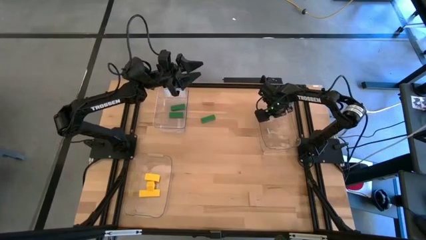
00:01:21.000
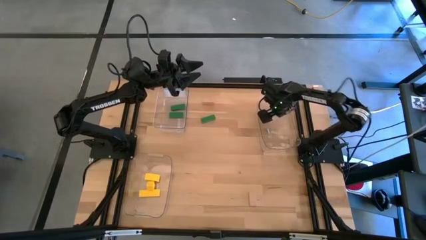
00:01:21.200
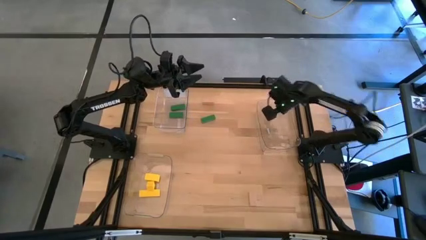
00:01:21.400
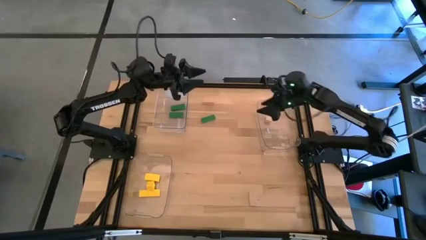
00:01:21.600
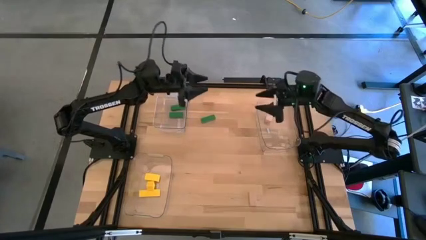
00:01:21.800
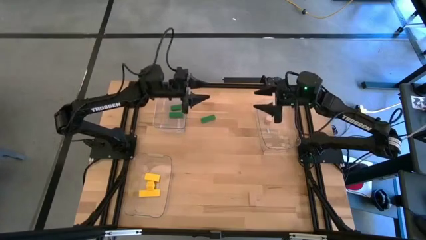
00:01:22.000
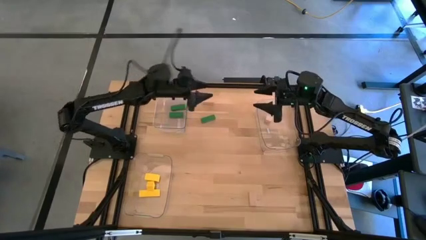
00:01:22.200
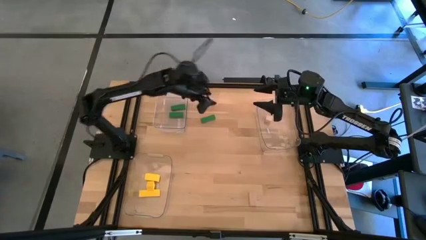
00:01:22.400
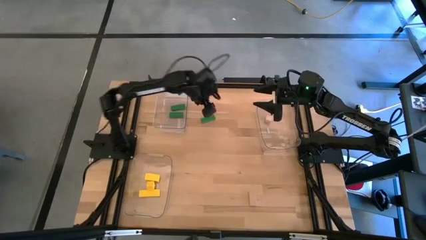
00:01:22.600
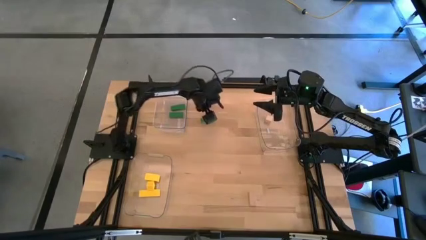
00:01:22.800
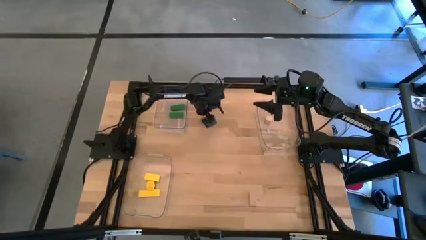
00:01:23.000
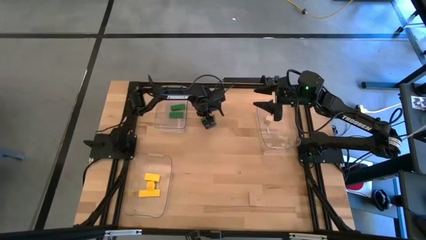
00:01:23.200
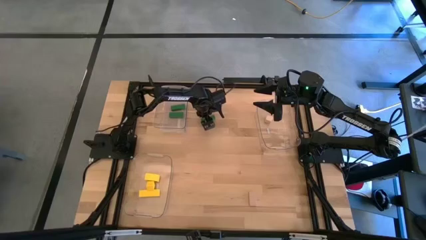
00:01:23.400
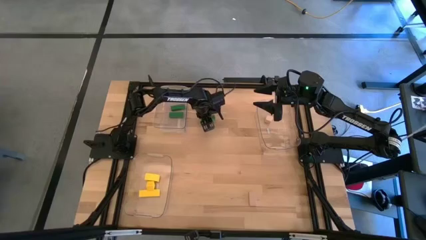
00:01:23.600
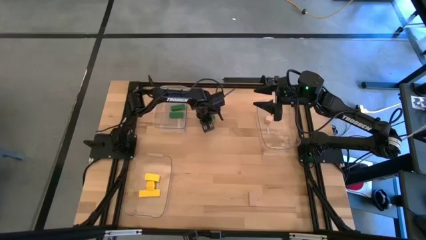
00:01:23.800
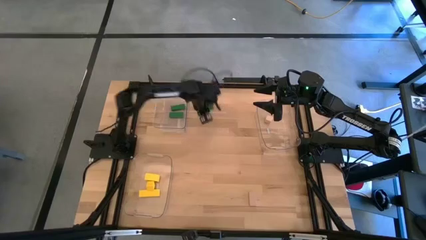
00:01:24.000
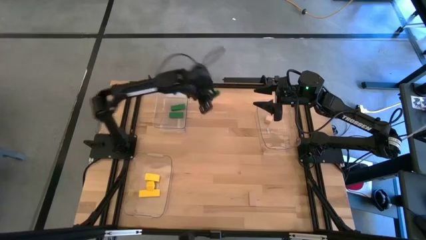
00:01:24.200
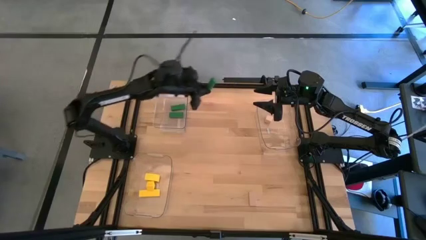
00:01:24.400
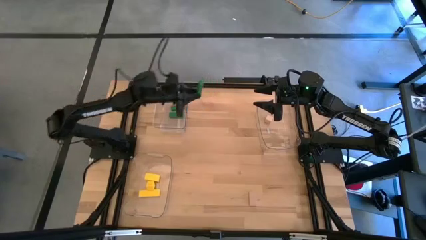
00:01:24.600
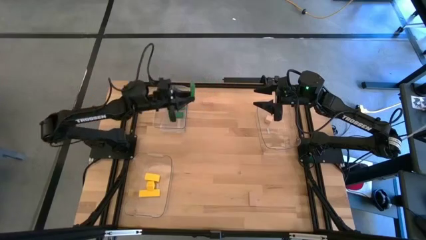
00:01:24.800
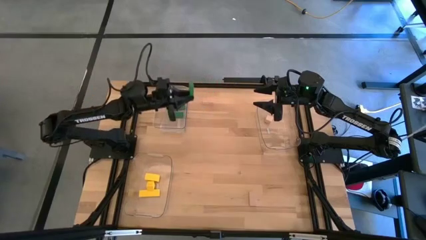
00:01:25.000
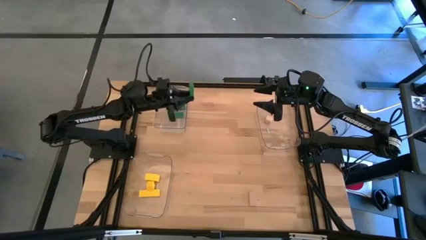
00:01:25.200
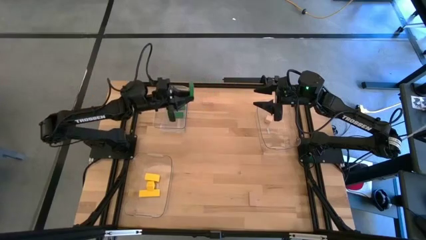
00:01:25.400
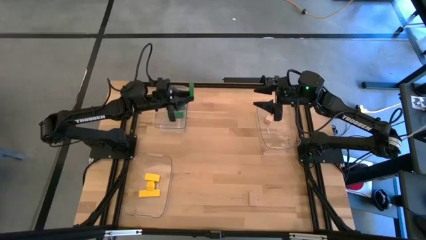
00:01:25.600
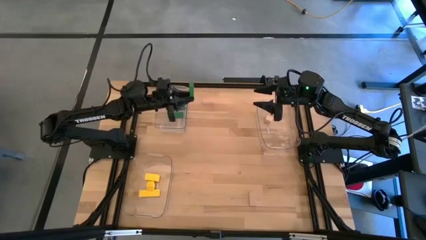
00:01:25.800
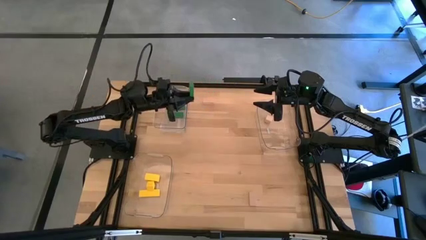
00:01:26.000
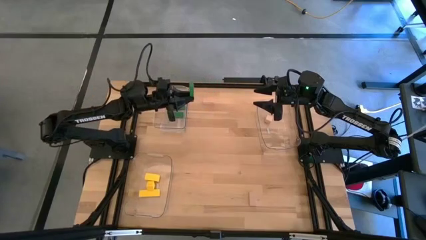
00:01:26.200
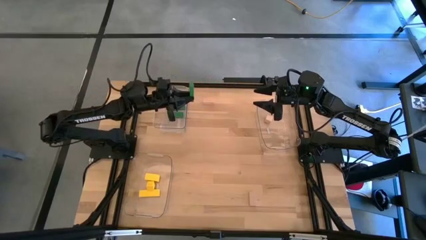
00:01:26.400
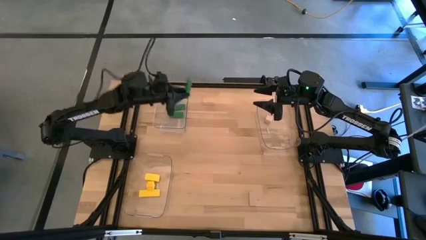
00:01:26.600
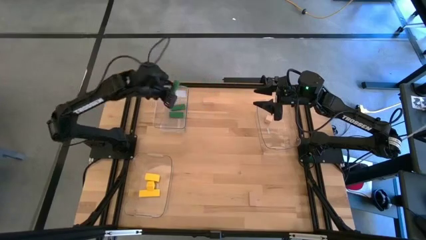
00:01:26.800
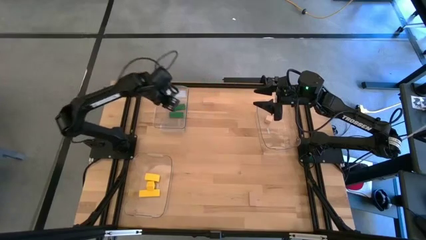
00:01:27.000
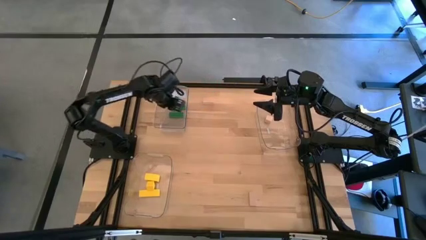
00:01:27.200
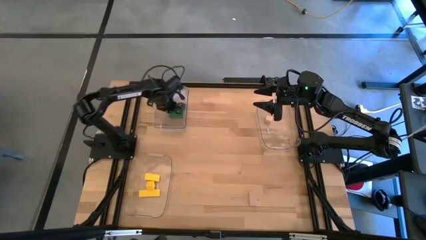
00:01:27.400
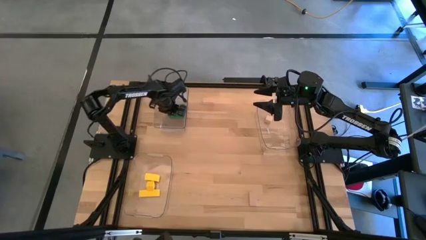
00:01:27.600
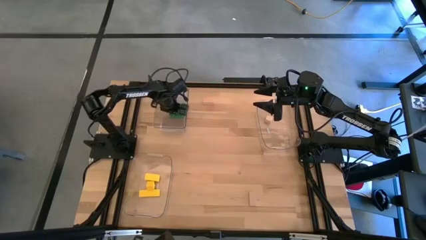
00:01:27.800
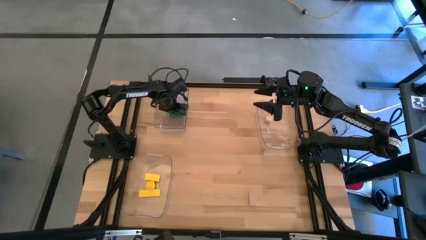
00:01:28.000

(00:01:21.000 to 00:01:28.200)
Task: Sort & place blocks by color
Put the green block into the top left transparent bin

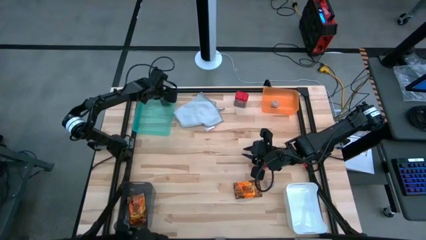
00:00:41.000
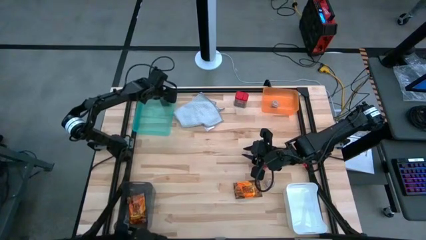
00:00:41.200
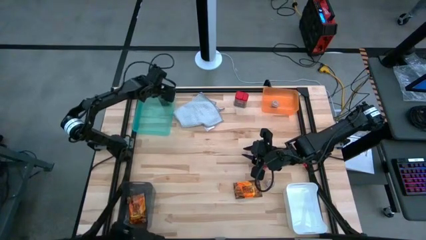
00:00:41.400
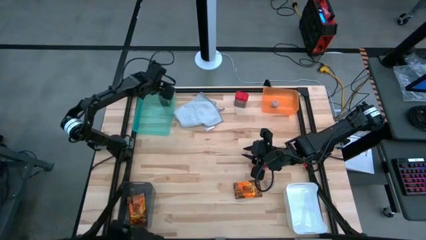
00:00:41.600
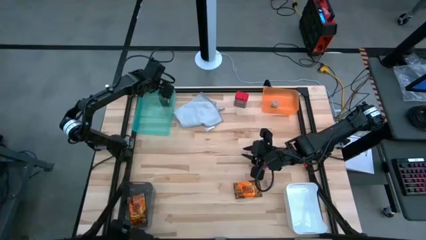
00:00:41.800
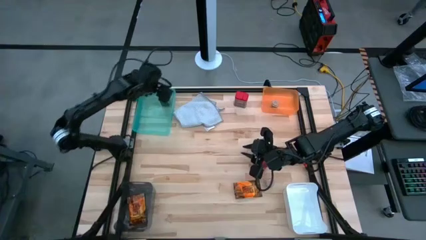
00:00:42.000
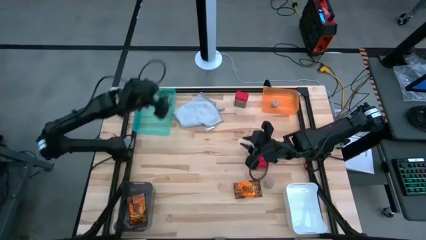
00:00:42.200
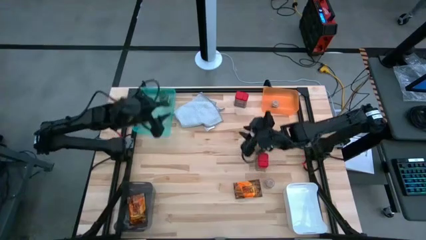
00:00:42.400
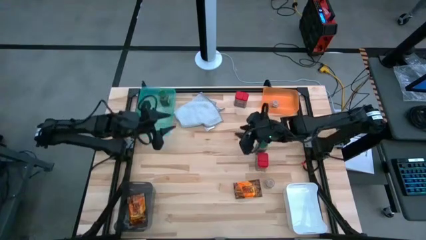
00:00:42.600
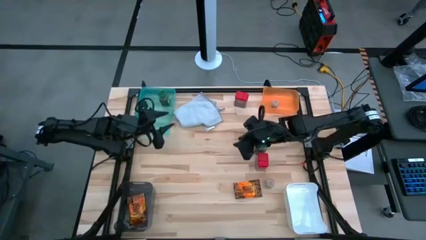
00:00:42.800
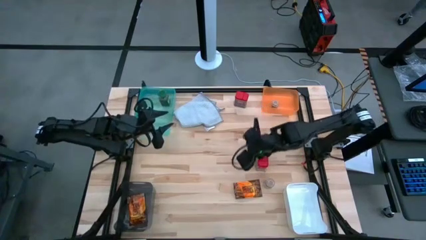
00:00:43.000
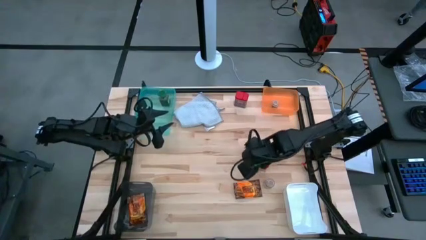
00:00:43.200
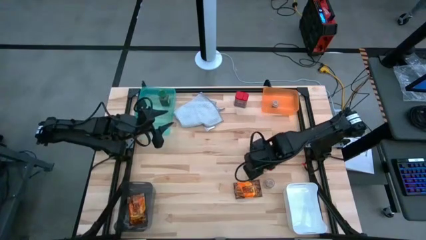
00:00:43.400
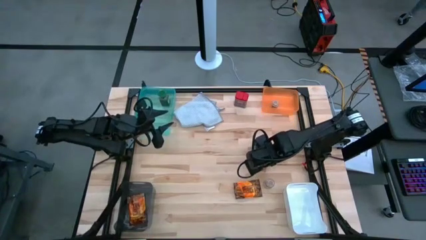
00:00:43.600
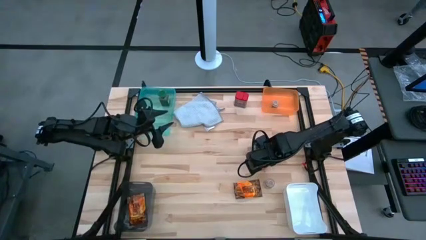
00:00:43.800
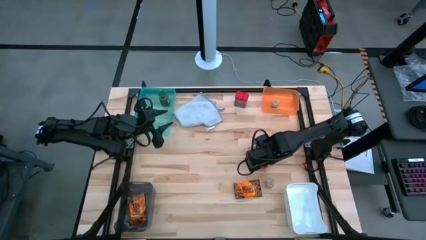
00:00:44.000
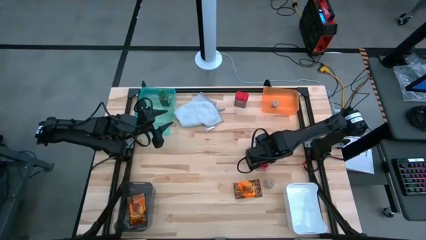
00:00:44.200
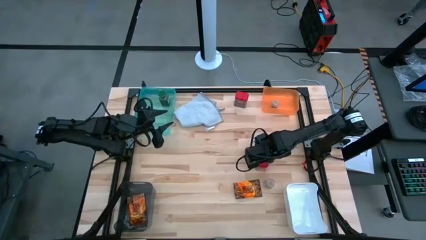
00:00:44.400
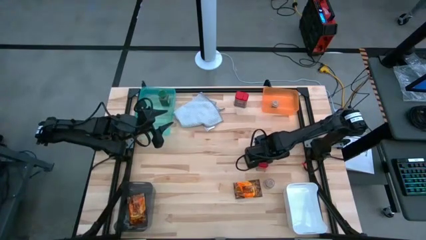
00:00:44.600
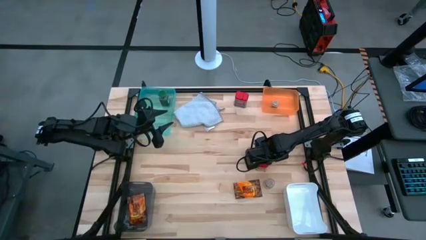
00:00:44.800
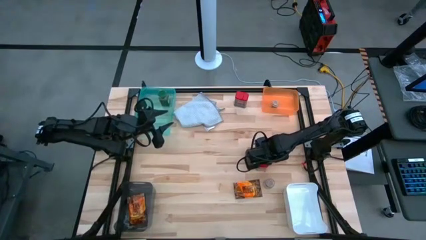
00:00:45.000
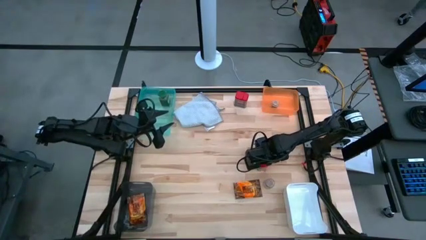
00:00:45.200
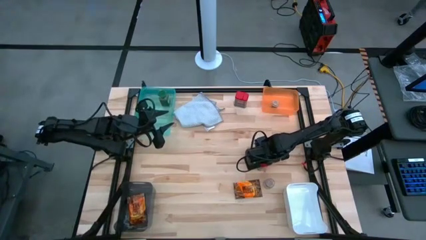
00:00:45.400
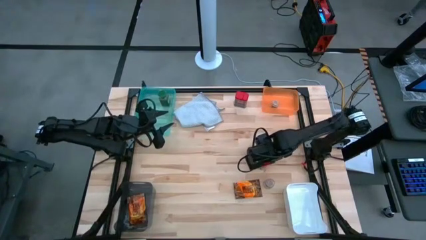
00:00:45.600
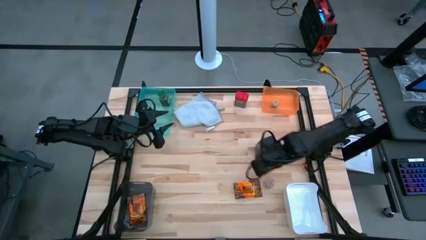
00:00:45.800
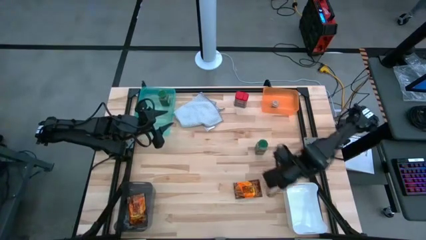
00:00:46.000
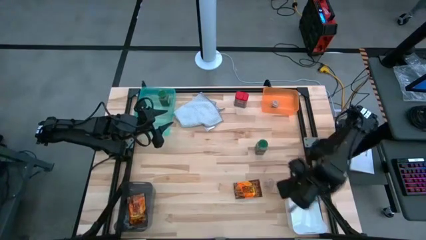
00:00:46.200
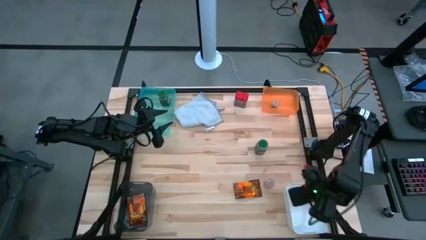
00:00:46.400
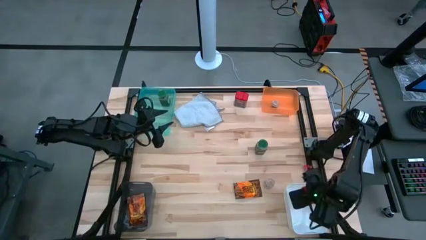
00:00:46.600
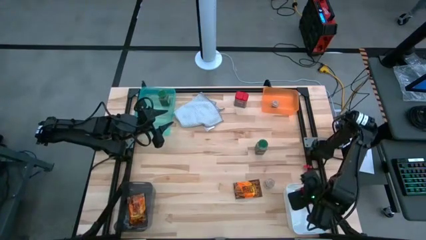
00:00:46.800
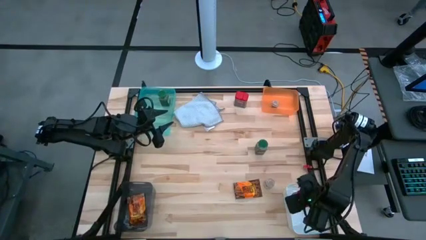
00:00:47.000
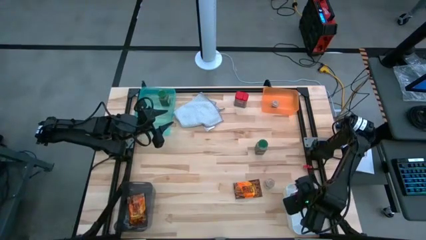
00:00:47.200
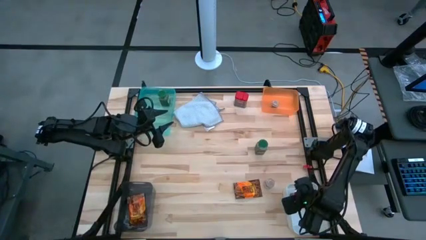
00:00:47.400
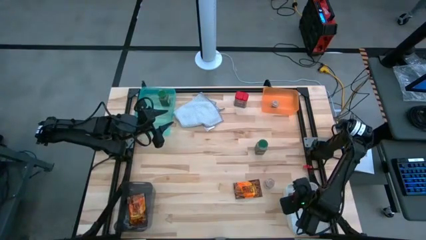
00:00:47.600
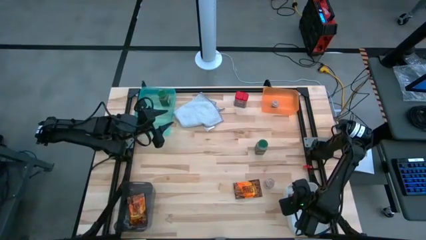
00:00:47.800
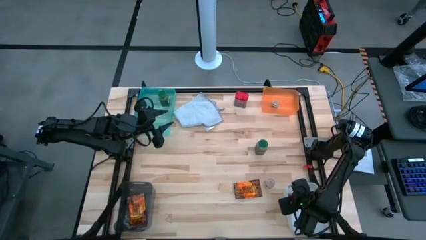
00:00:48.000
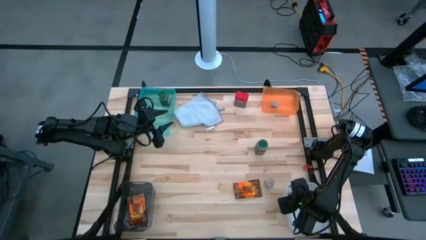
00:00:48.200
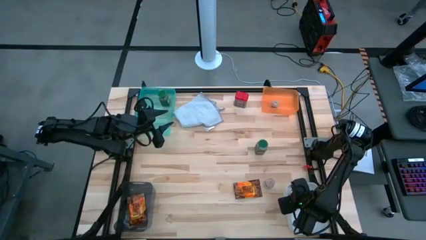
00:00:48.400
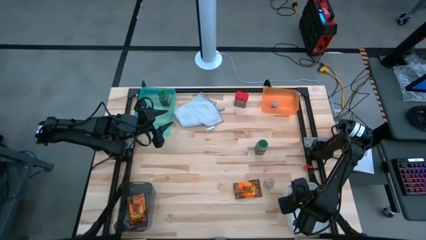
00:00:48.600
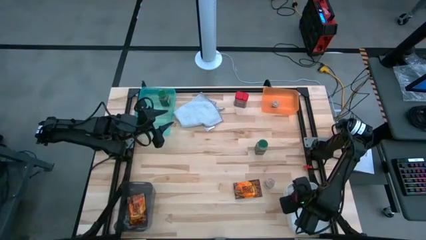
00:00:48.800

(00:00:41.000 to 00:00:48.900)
Task: Sort spices by type
Put the bottom red seasoning can into the white bin
